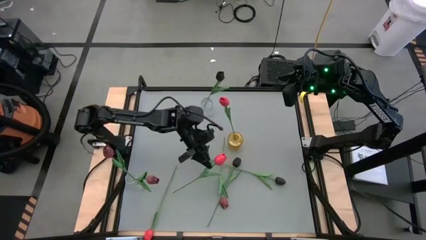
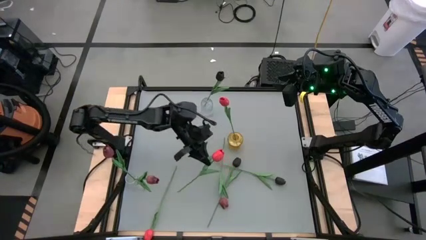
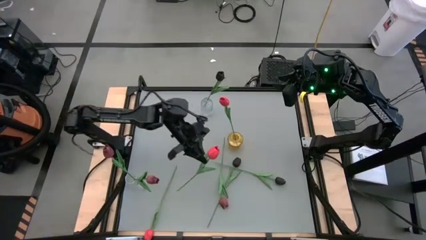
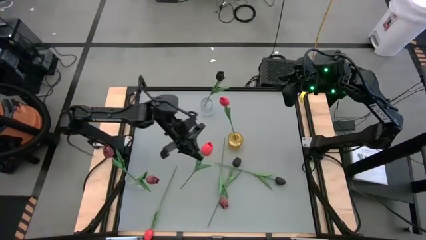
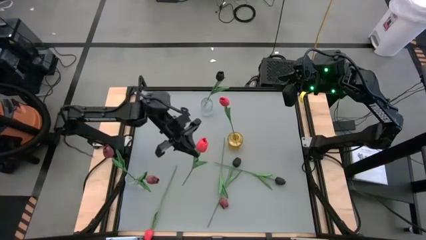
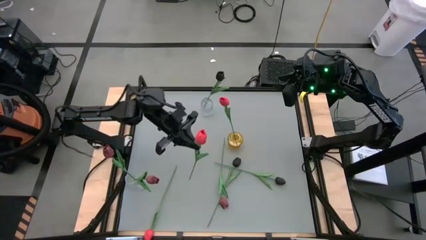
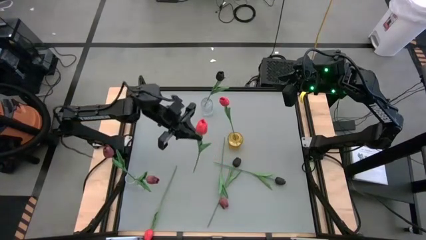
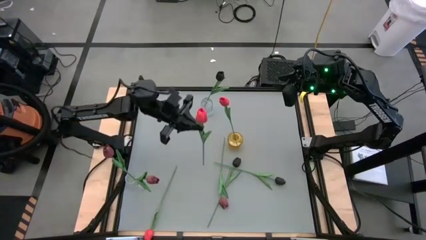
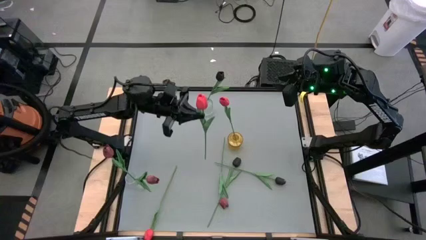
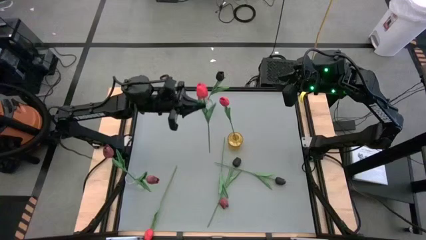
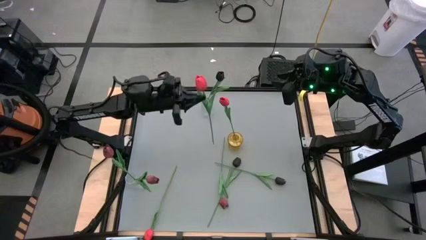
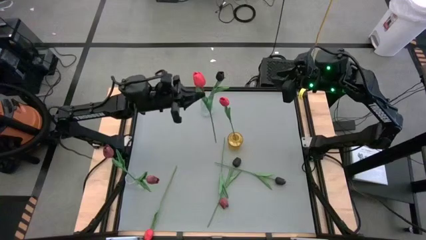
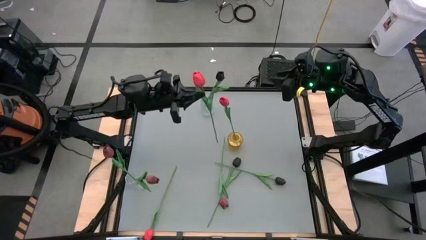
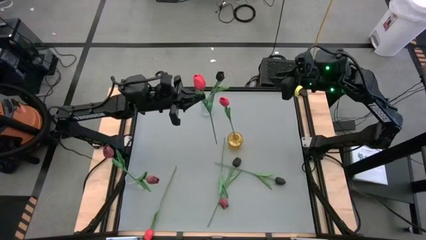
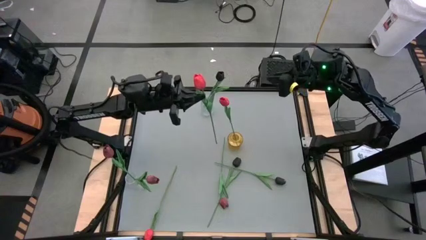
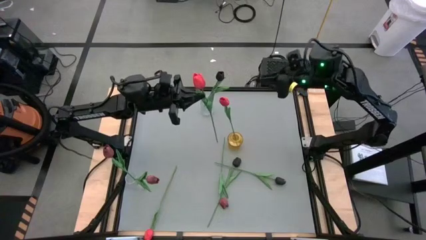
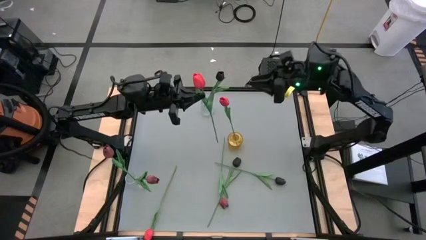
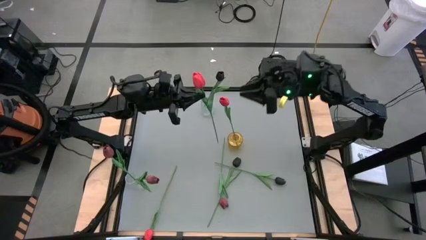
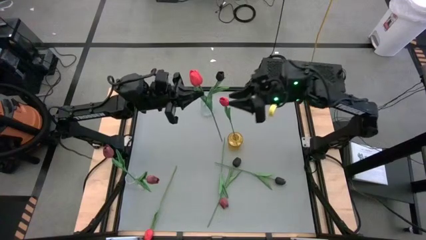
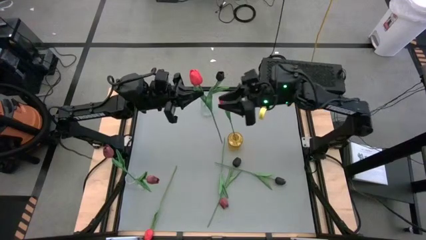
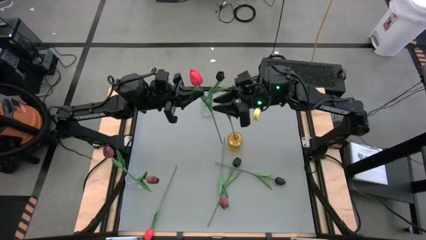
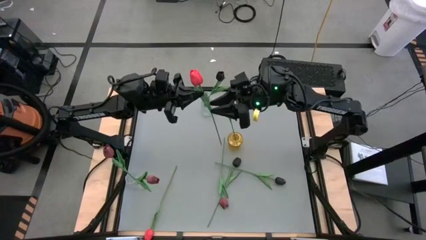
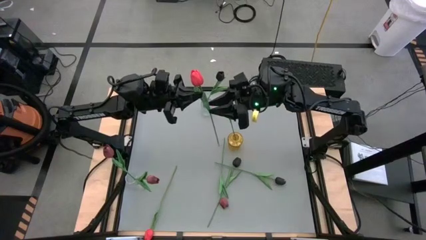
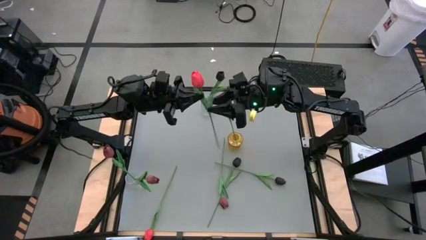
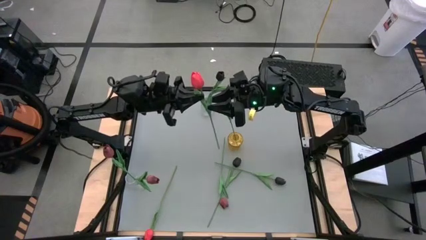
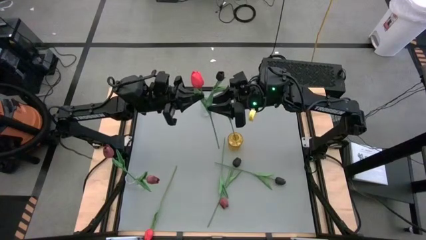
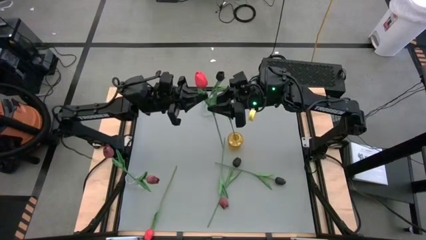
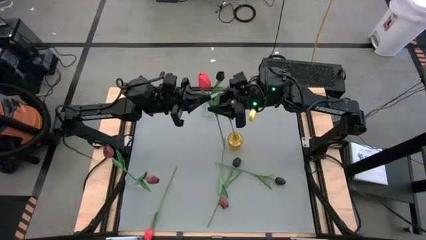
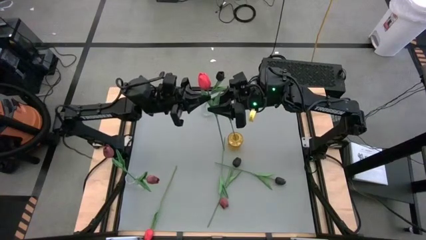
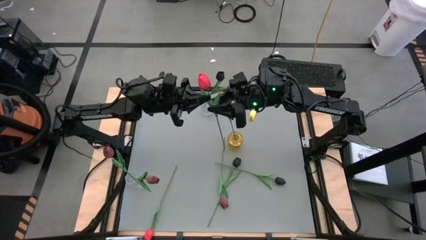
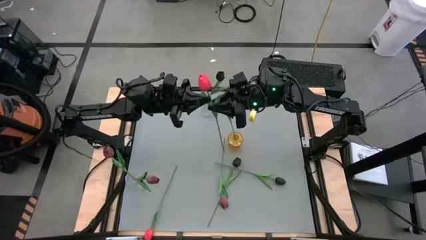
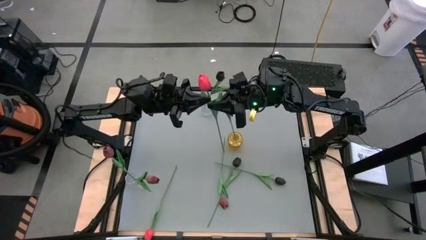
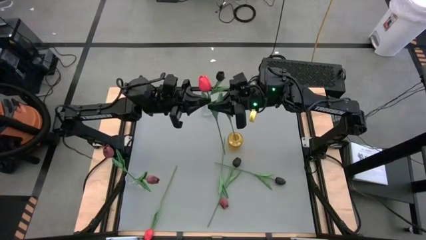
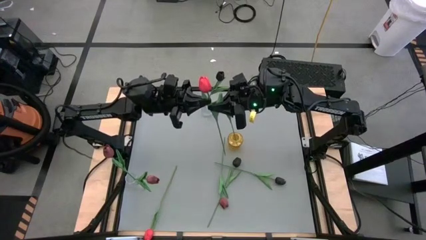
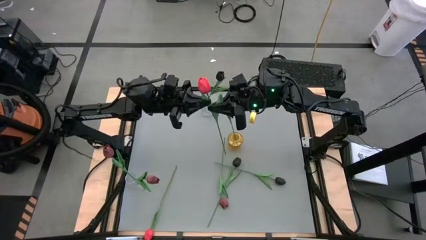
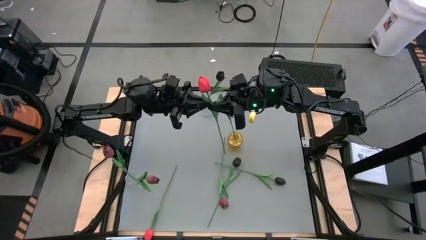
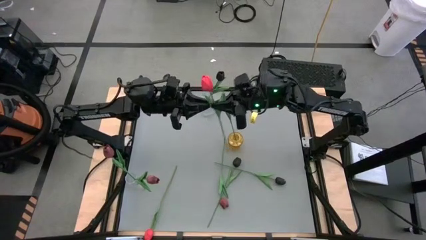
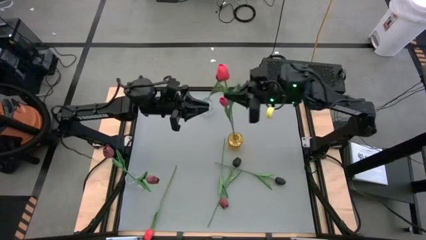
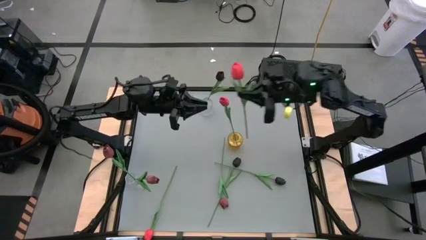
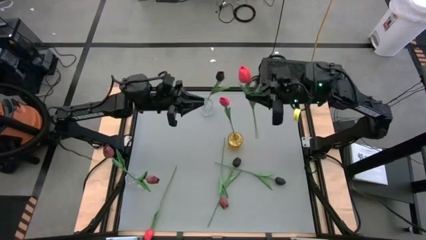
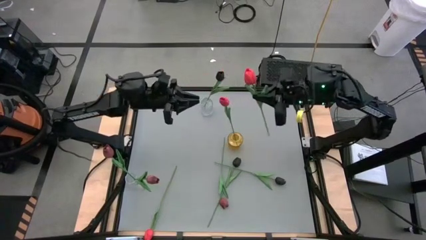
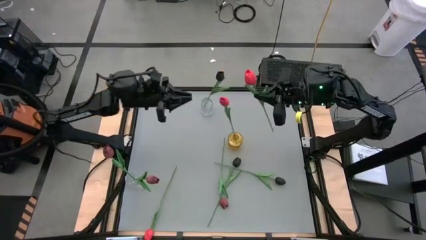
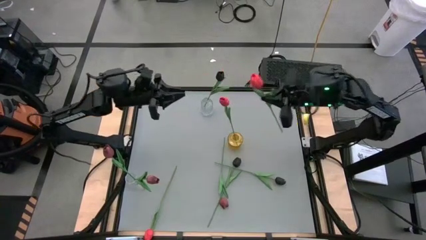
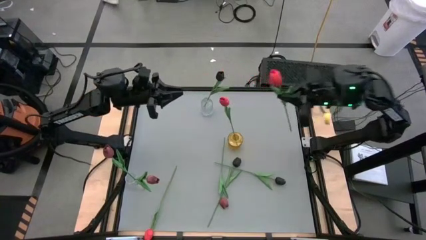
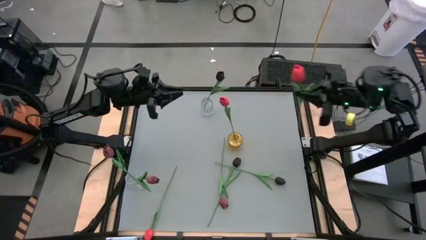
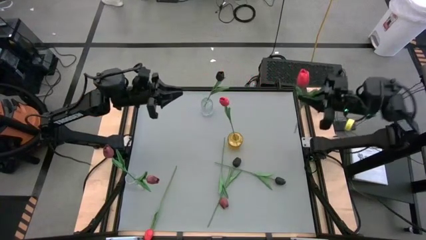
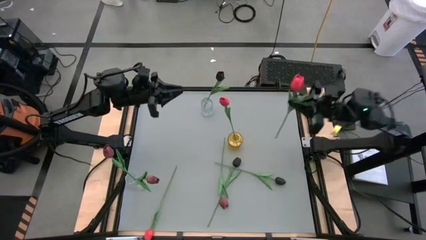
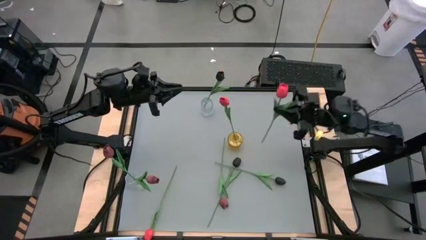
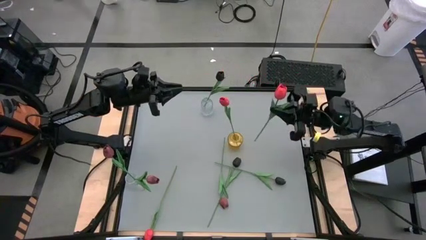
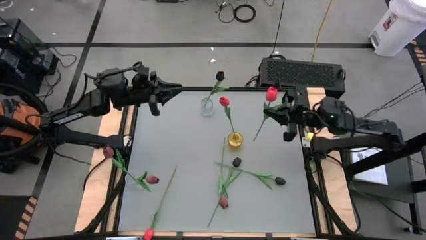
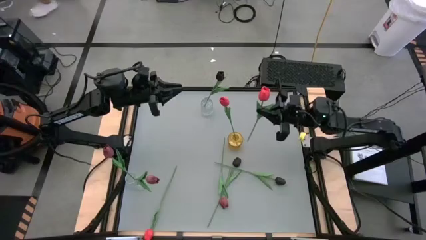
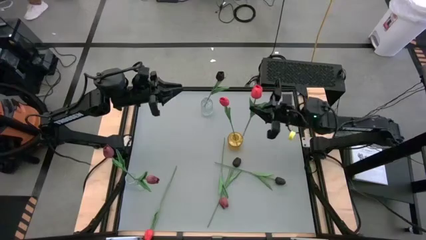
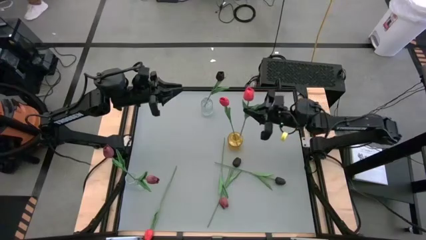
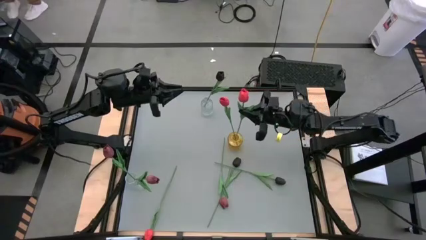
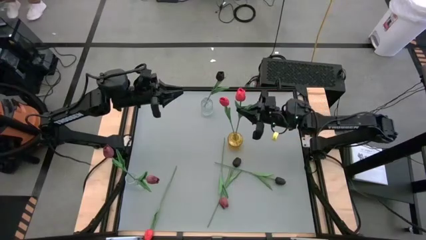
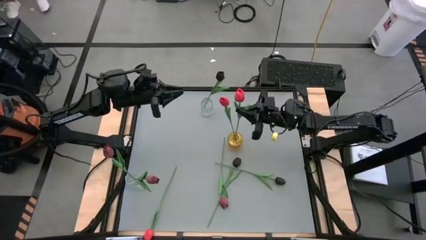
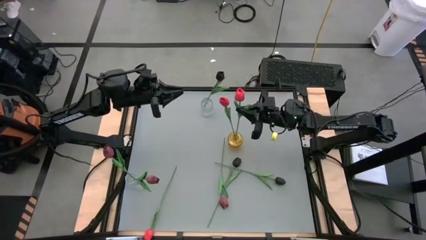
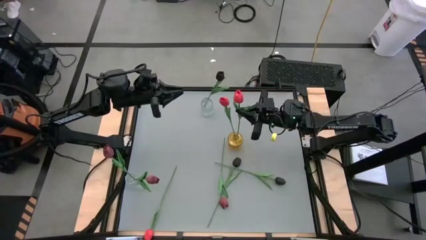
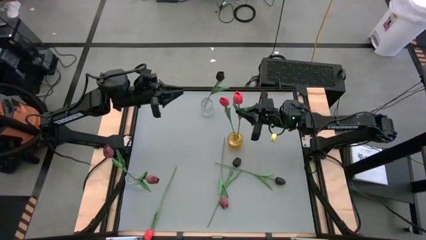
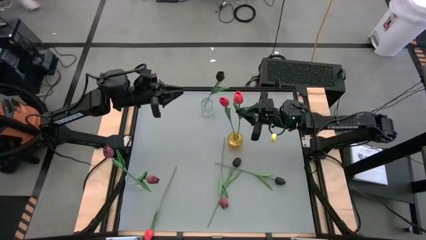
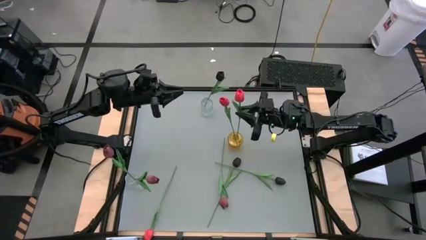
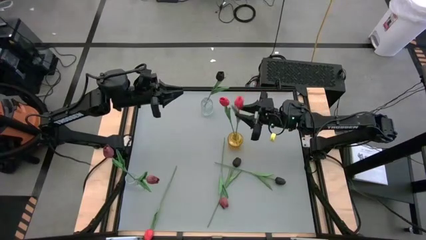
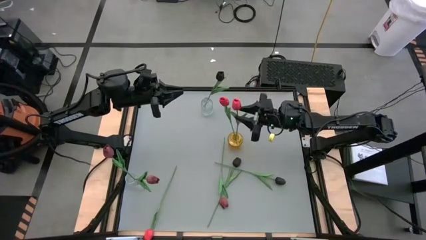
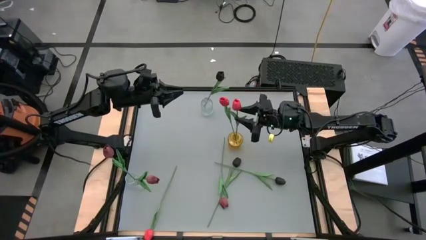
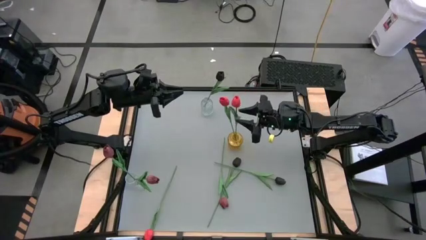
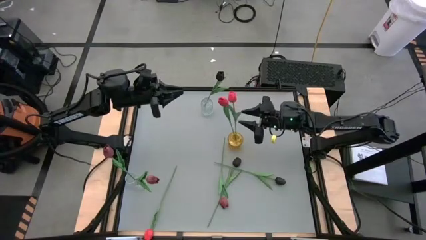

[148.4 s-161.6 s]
Task: Sort flowers into vase by color
Put the right pink tulip into the yellow vase

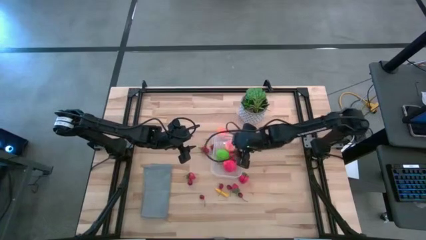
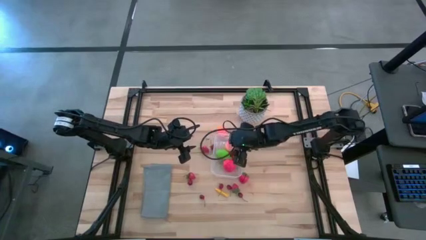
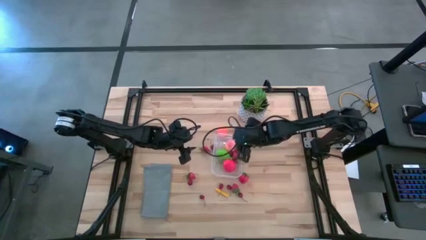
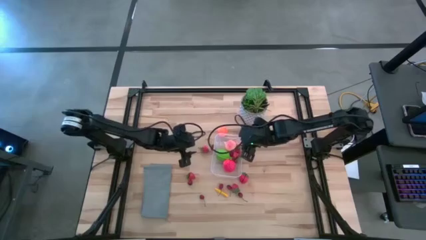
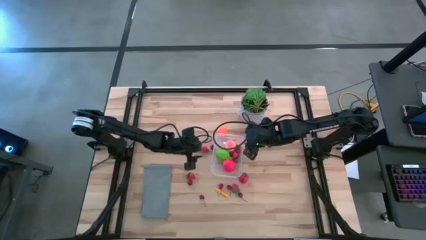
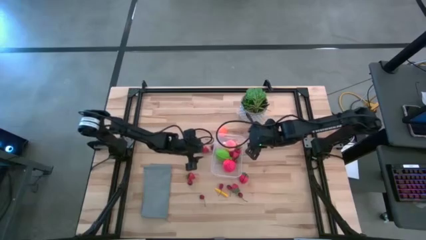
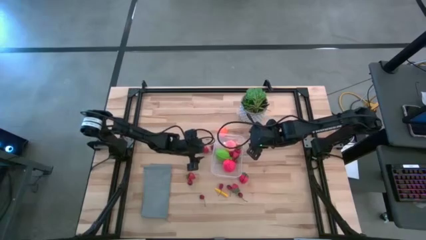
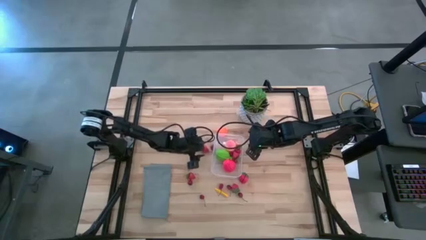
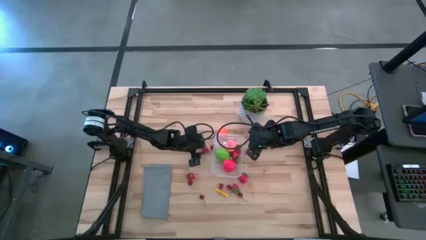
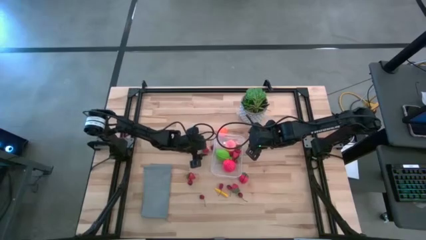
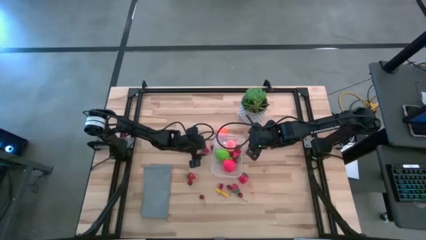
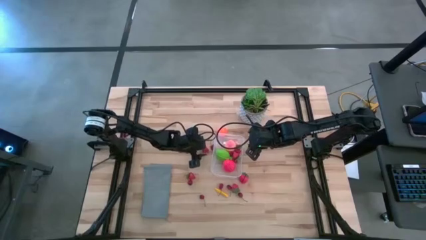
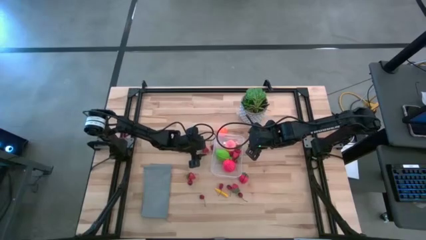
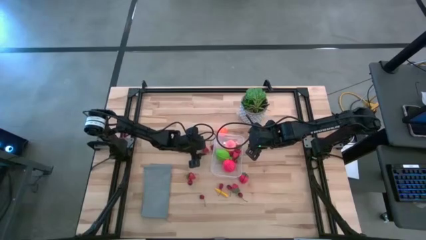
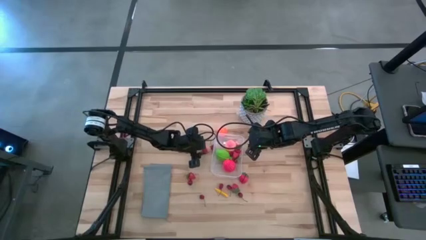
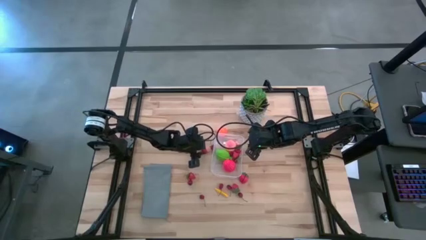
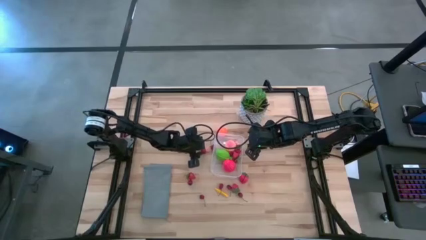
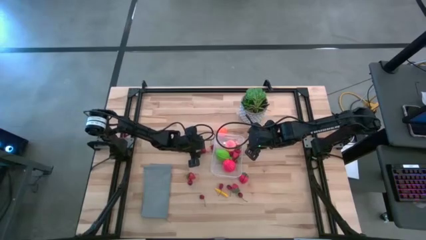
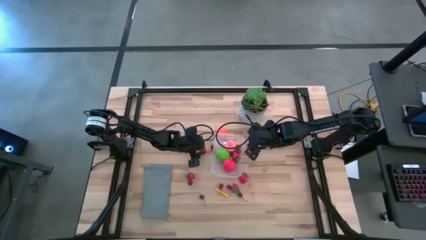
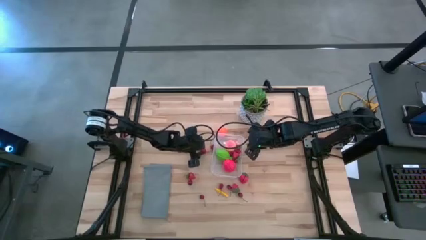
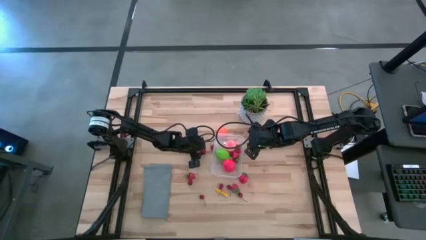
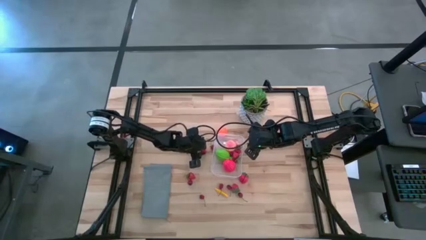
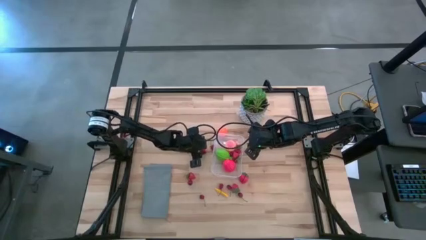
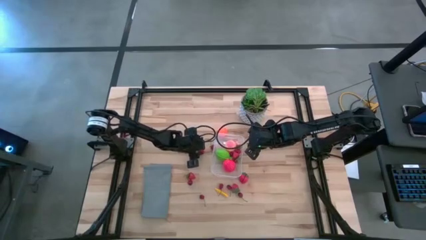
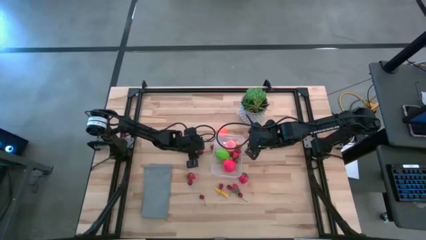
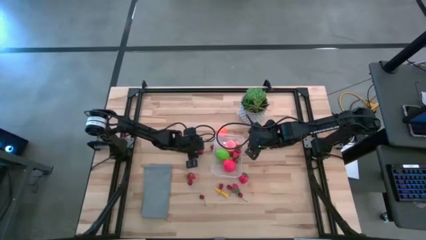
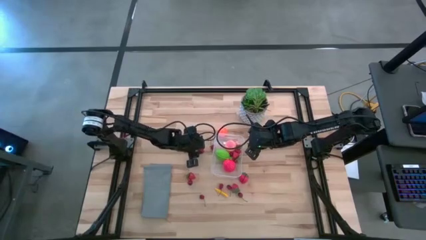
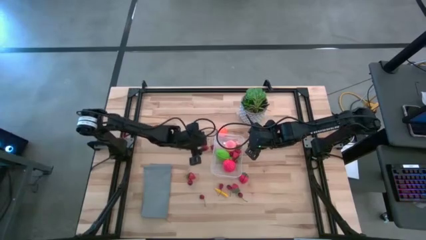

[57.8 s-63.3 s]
Task: Pick and placing Produce into tupperware
Put the red strawberry into the transparent bin
